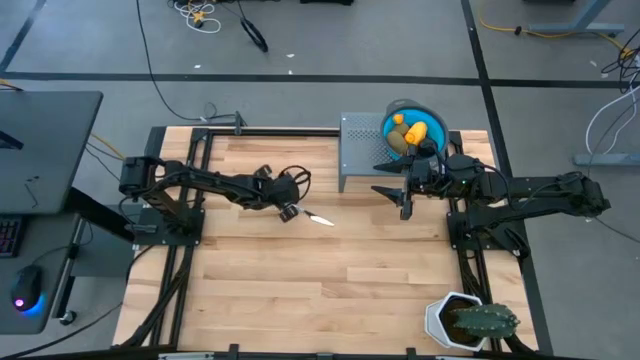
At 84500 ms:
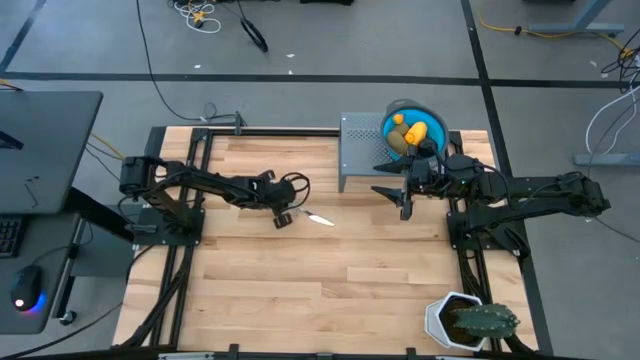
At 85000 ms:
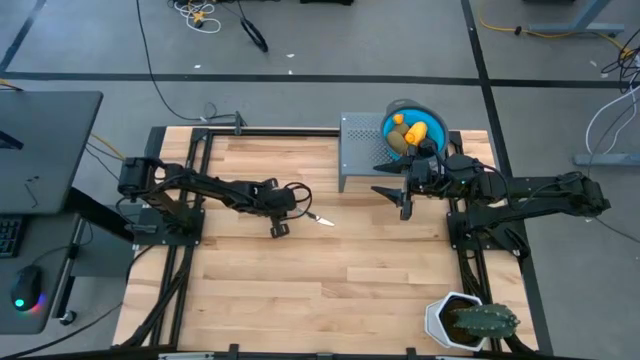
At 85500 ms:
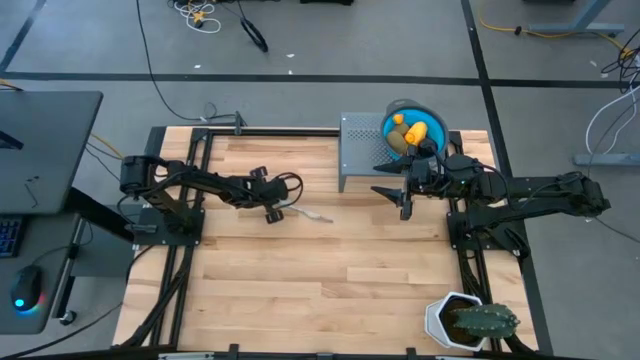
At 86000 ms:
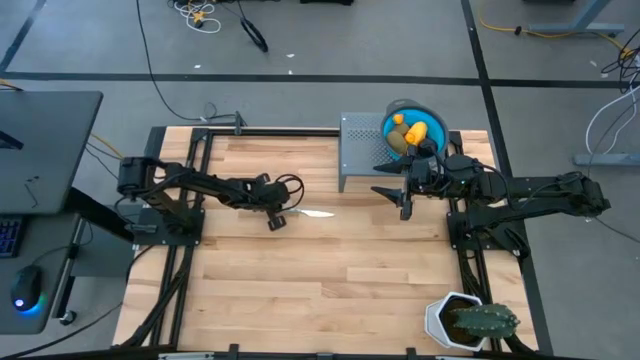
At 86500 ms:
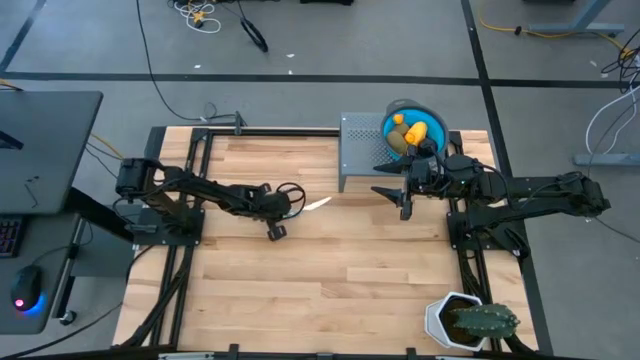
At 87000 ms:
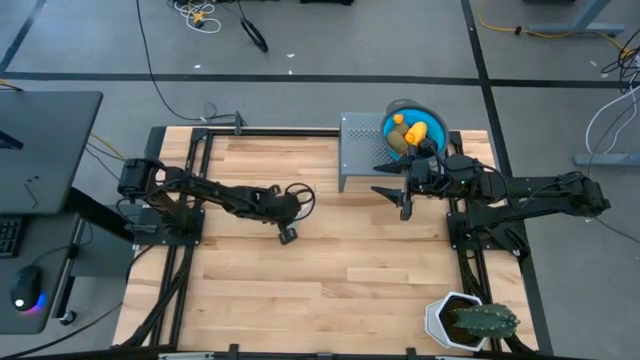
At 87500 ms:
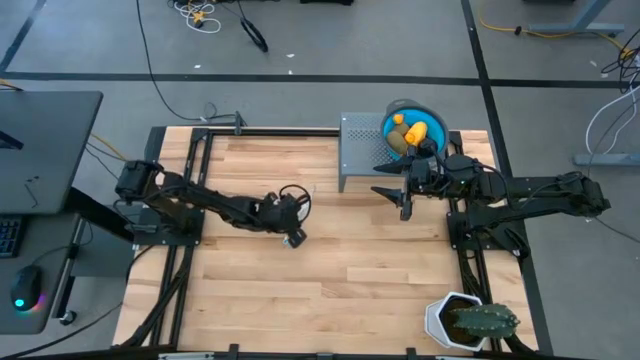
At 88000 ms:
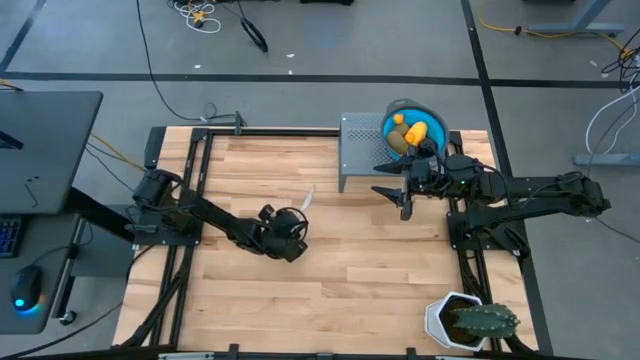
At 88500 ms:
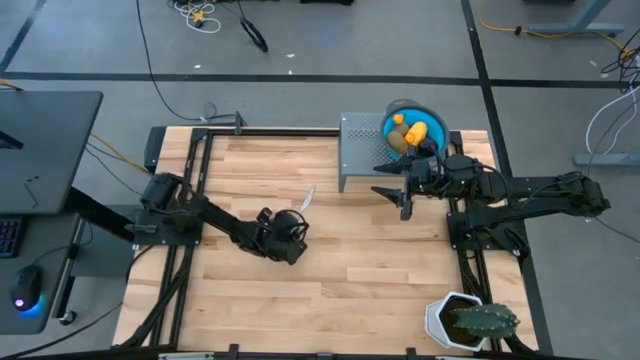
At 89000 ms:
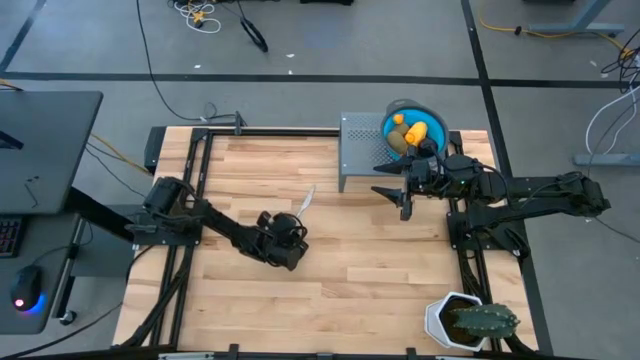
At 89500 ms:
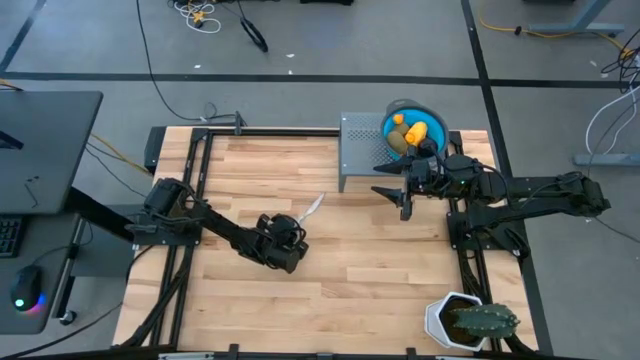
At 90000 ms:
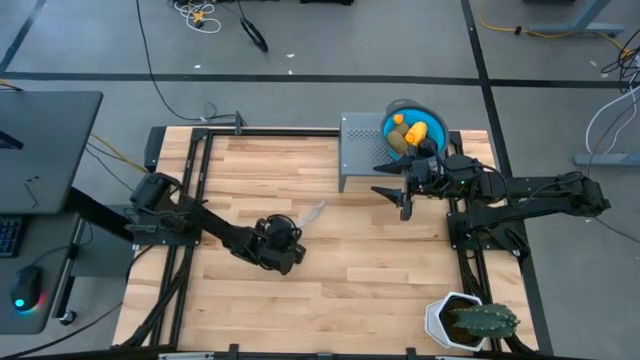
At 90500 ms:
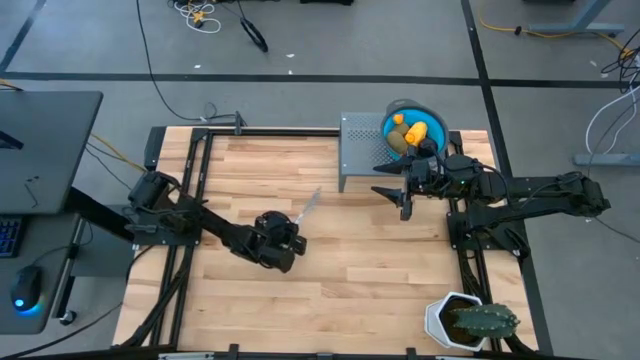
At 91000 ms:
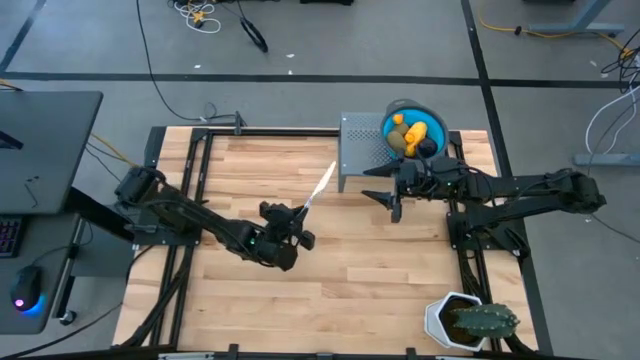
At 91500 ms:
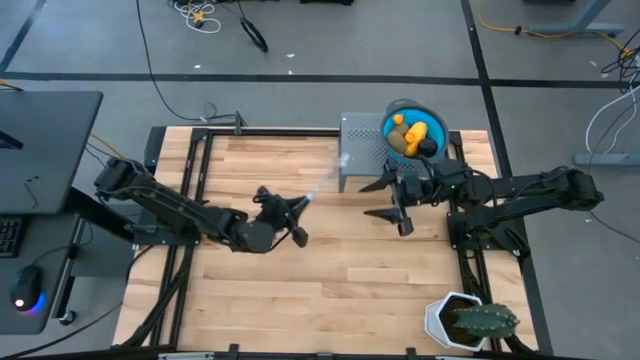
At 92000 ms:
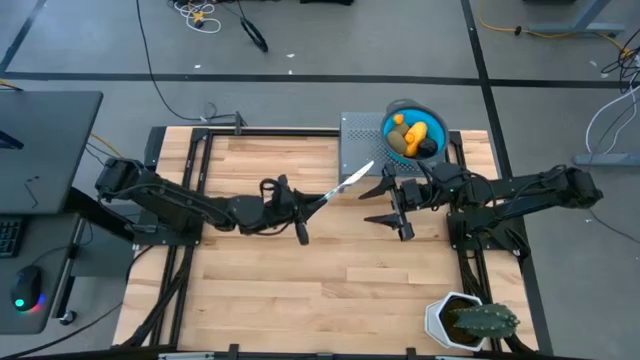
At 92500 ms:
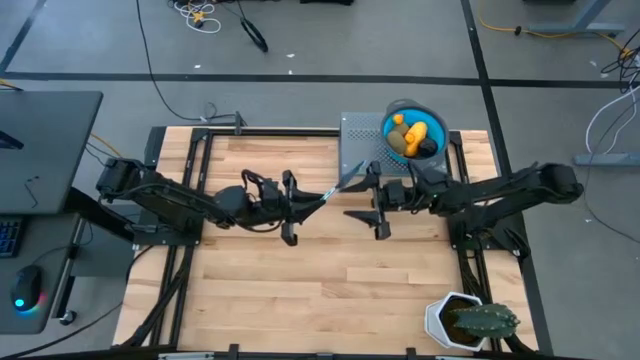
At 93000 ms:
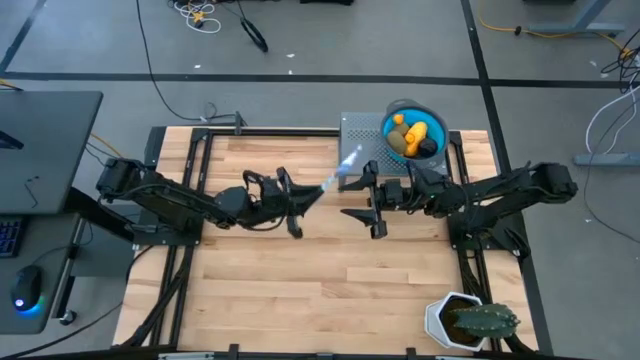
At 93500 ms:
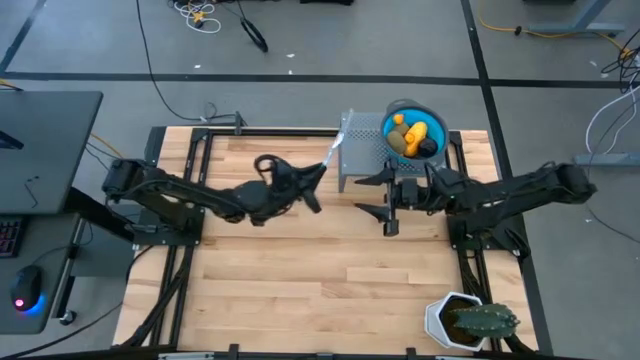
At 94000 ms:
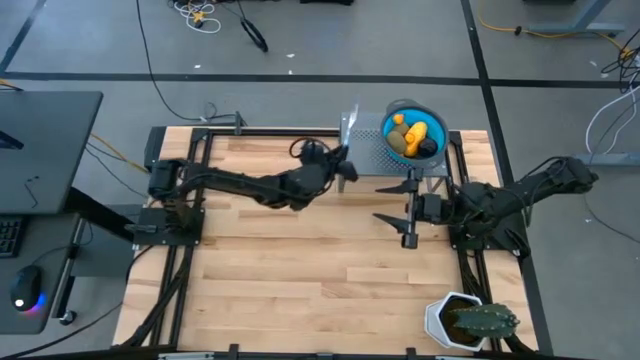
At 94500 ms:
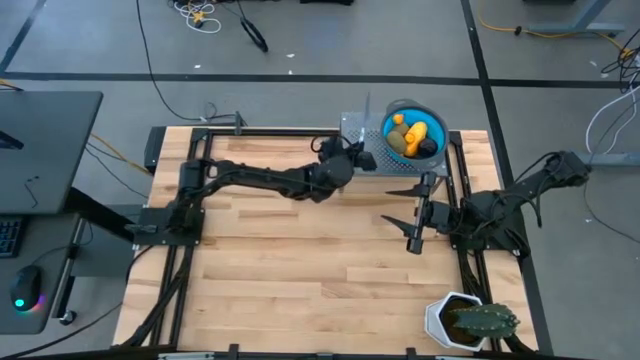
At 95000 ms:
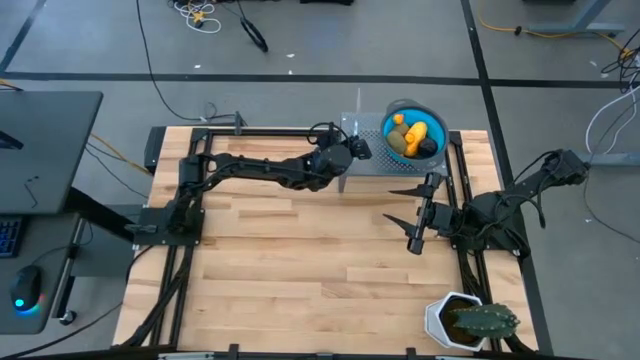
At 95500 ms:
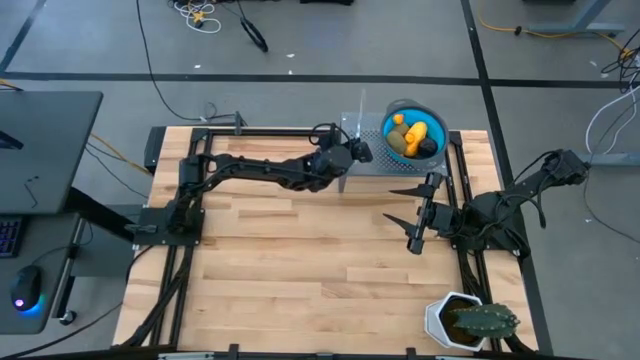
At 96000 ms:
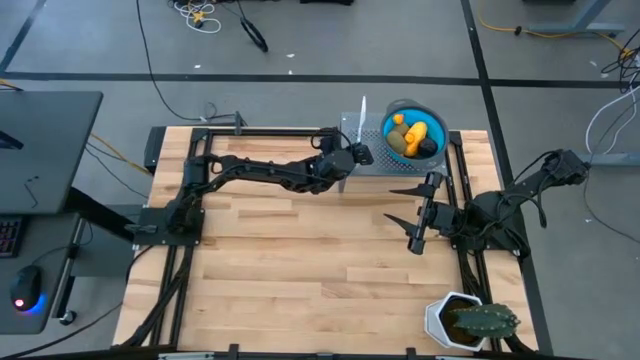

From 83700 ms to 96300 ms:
Task: Pick & Place Fruit
Put the blue knife on the shelf to the left of the blue strainer bowl

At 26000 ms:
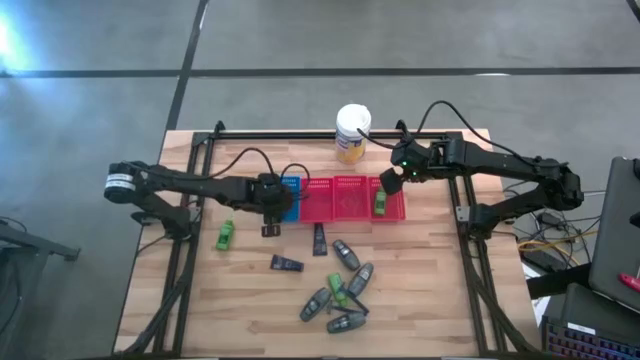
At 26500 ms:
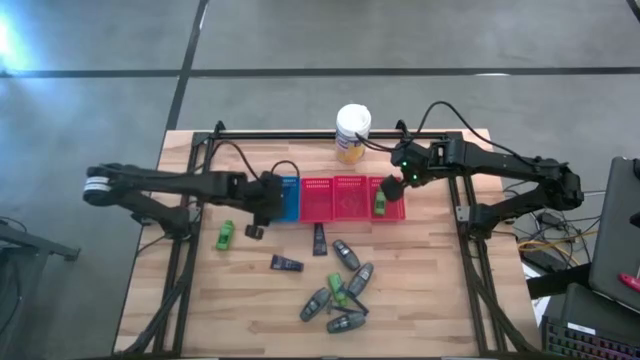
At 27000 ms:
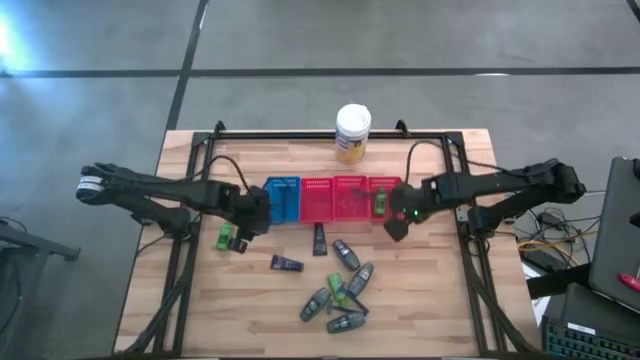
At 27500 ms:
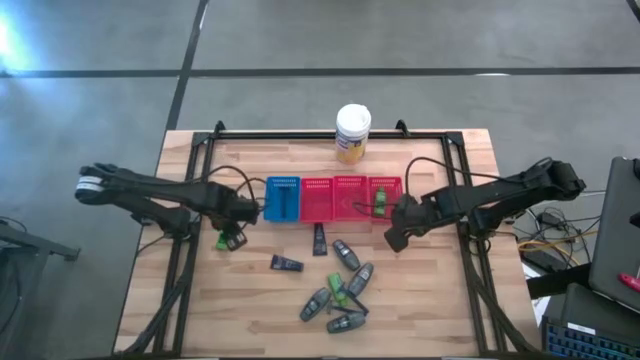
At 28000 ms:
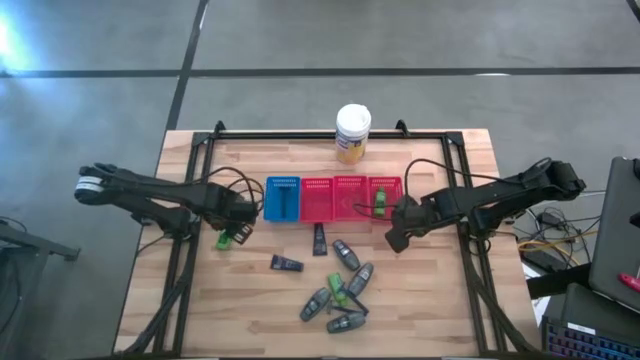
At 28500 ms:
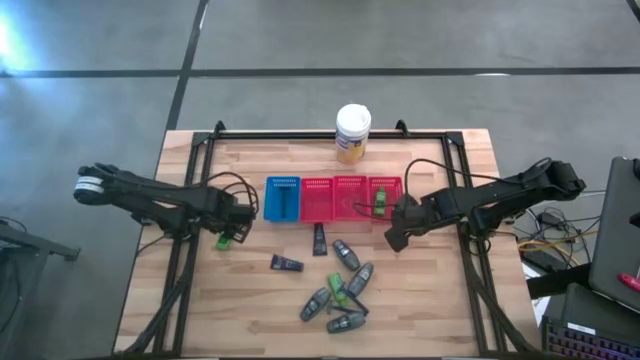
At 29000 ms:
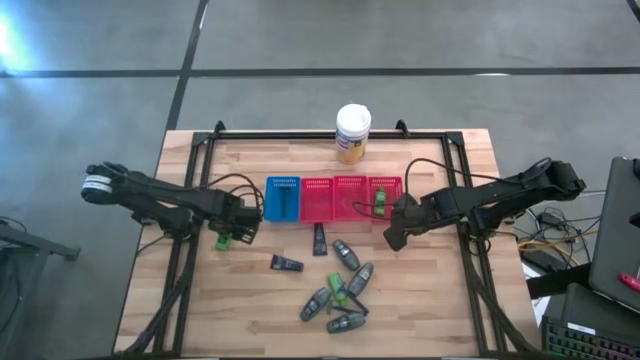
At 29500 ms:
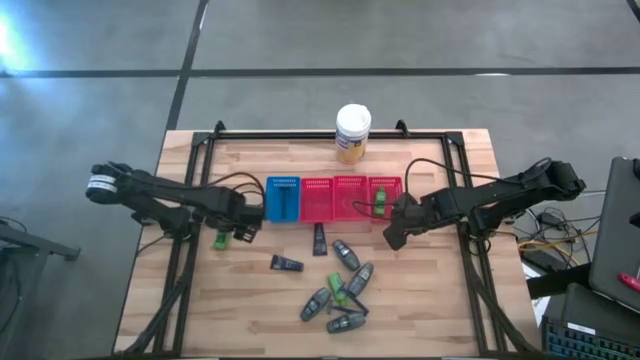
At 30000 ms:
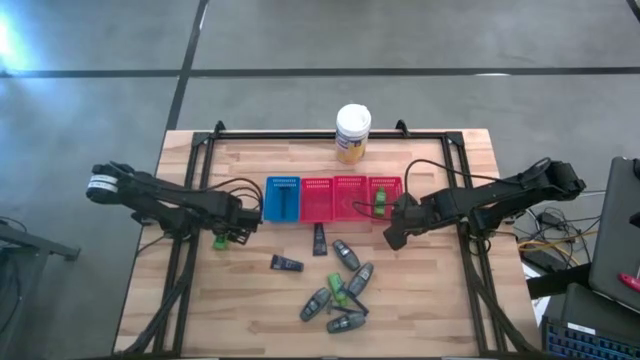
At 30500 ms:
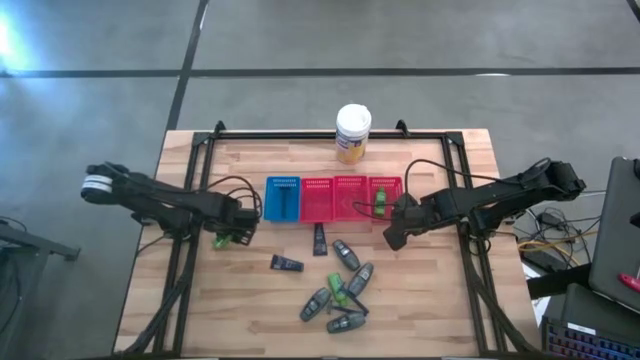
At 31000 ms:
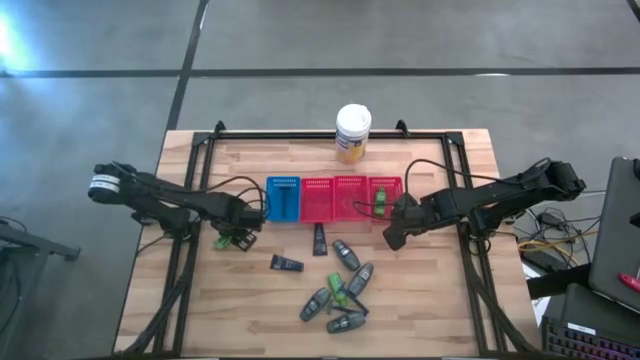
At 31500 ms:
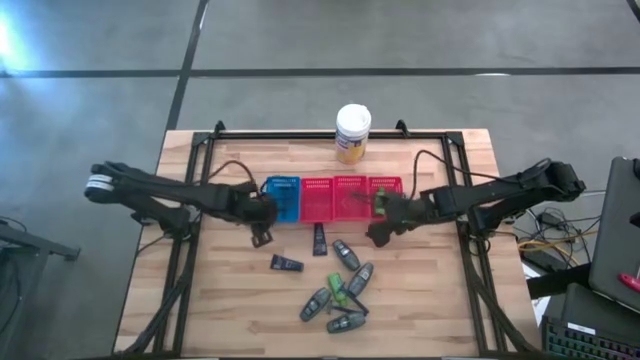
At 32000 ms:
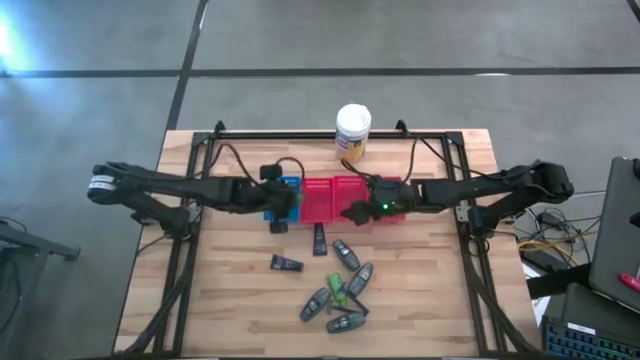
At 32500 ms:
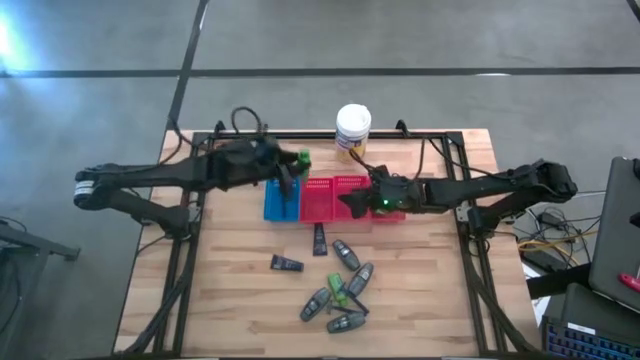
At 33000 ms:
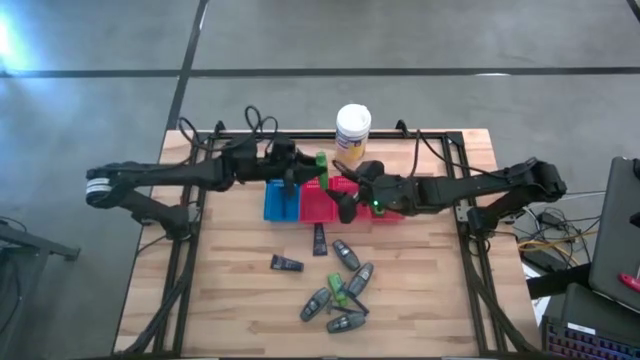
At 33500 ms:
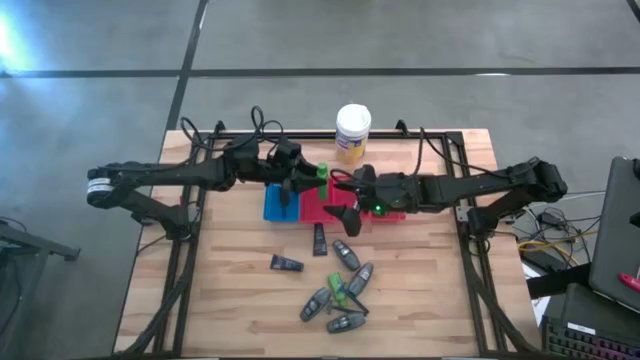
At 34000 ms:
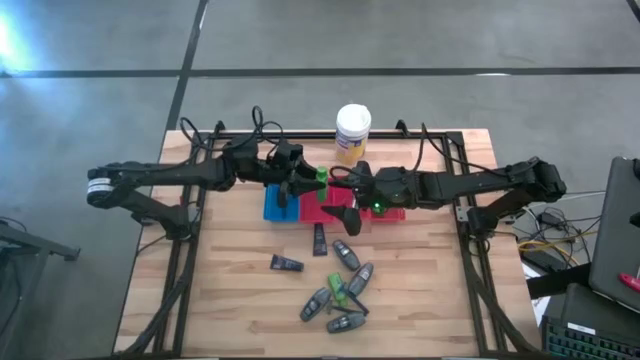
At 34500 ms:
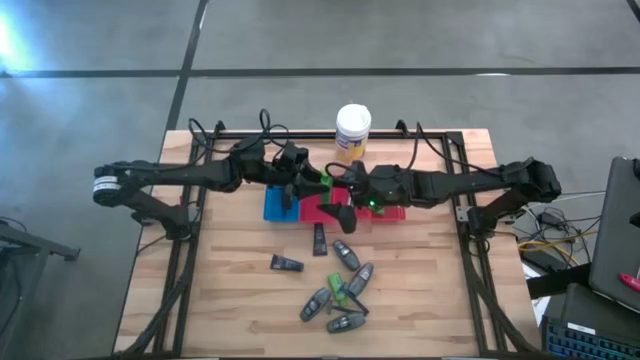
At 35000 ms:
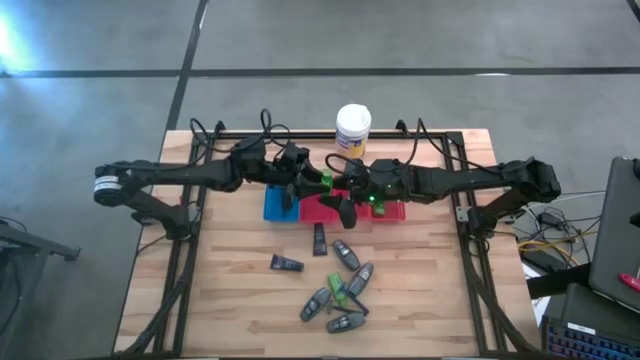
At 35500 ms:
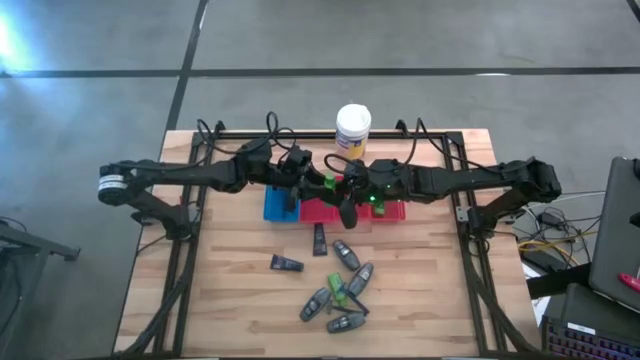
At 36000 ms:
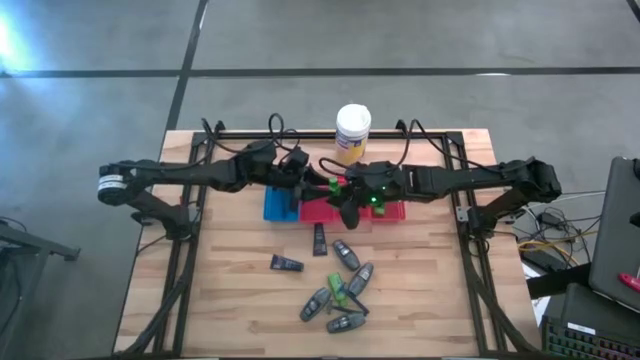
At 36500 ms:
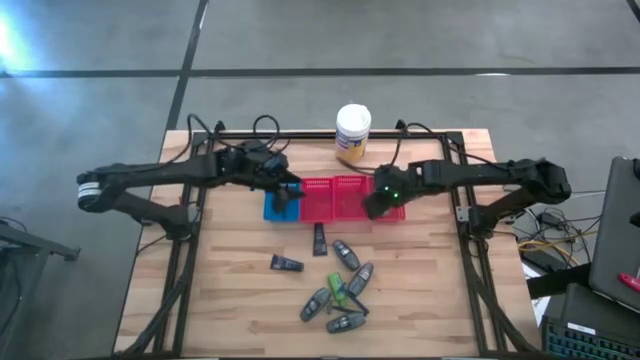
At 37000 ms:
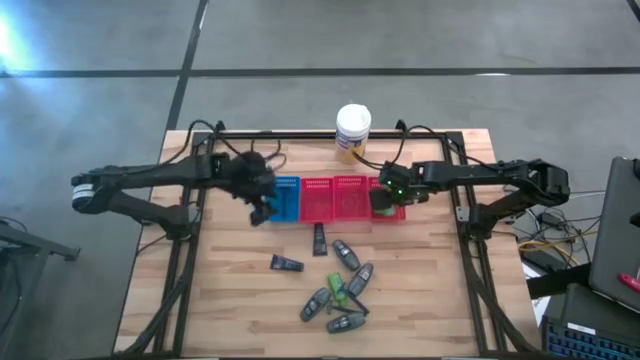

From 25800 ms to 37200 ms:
Task: Pick & Place Travel size toiletries
Put the green shampoo into the right red bin
